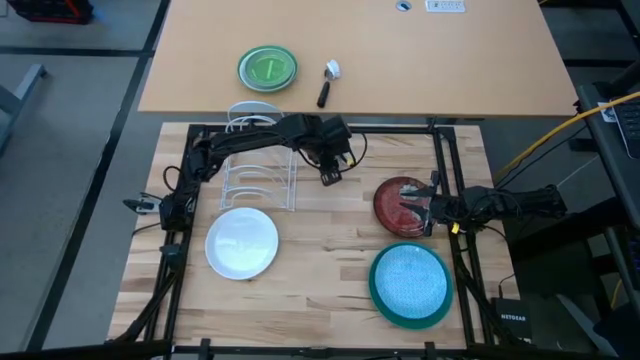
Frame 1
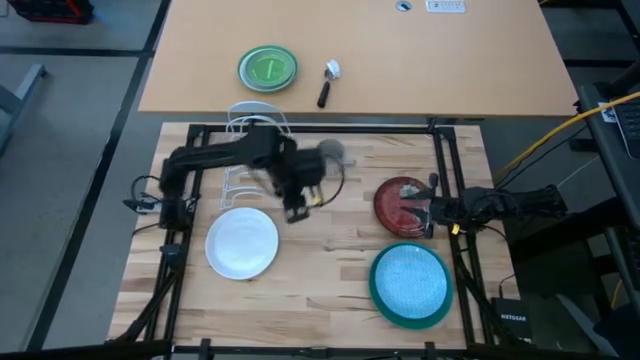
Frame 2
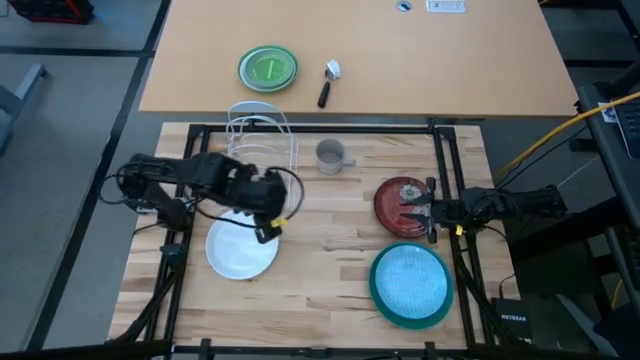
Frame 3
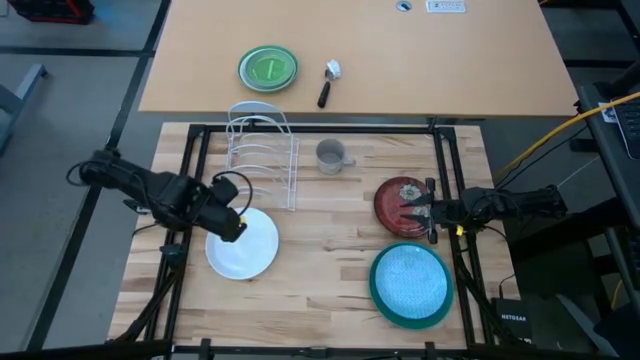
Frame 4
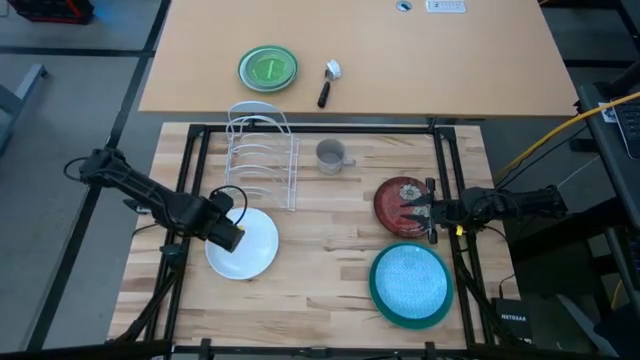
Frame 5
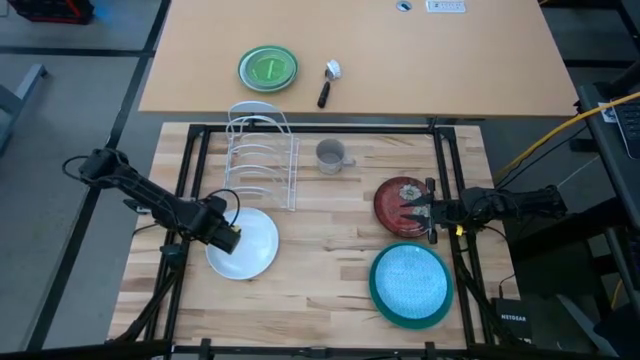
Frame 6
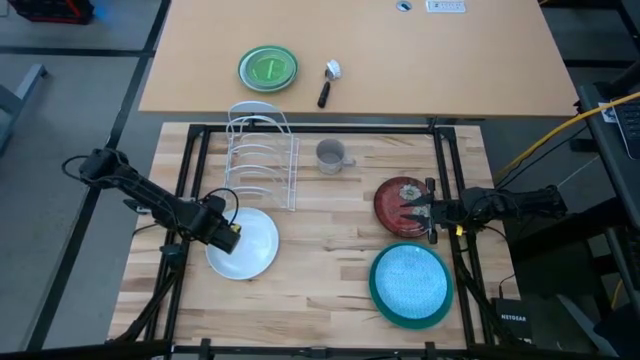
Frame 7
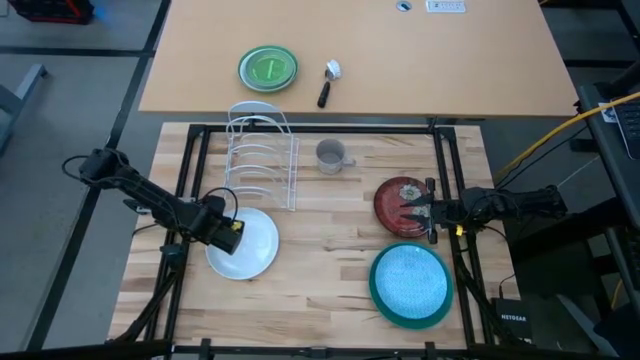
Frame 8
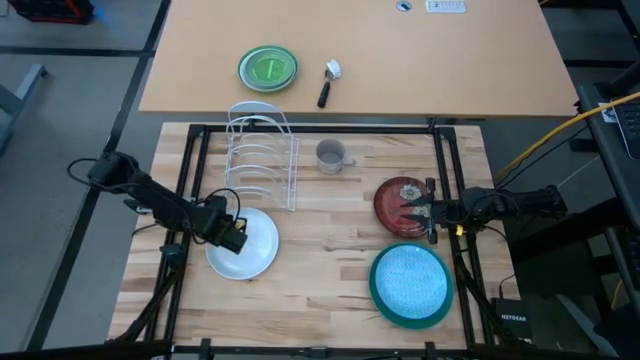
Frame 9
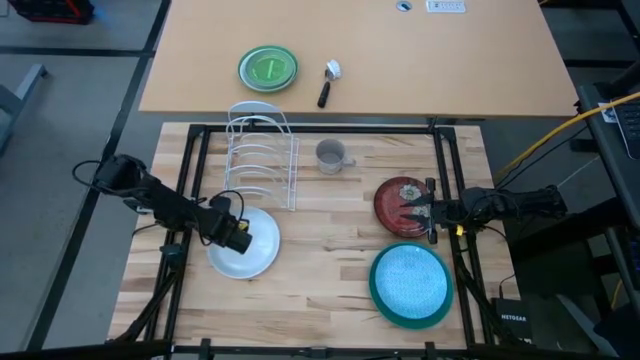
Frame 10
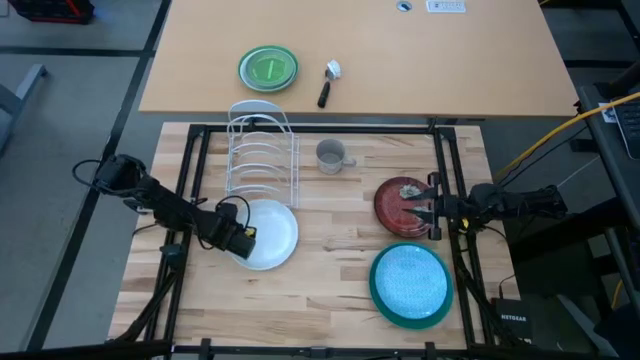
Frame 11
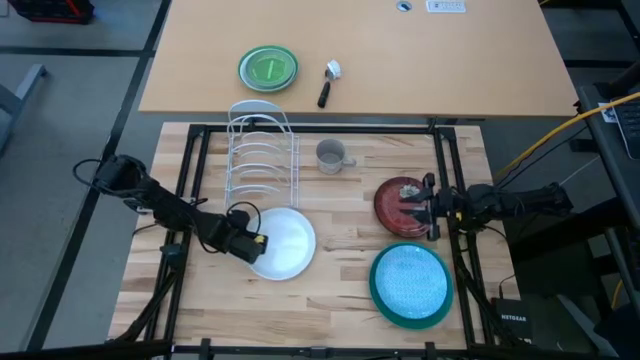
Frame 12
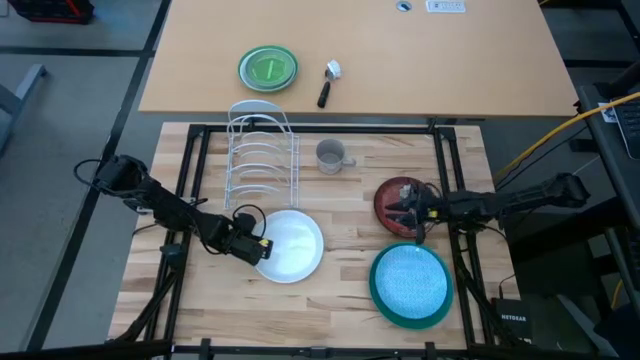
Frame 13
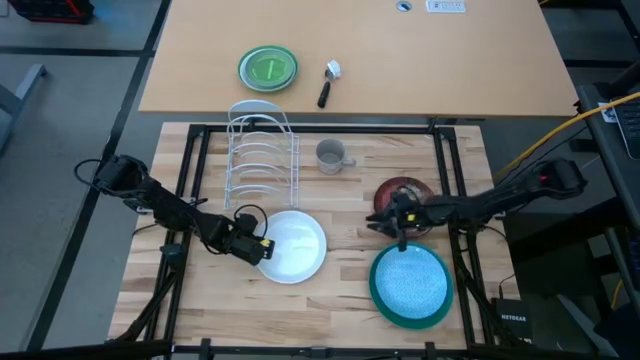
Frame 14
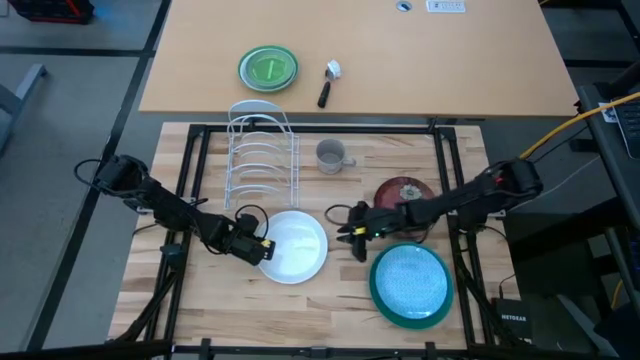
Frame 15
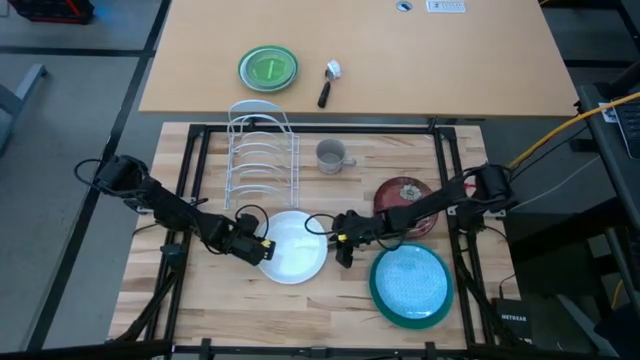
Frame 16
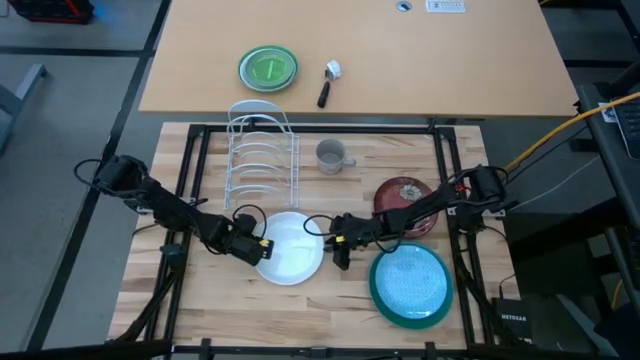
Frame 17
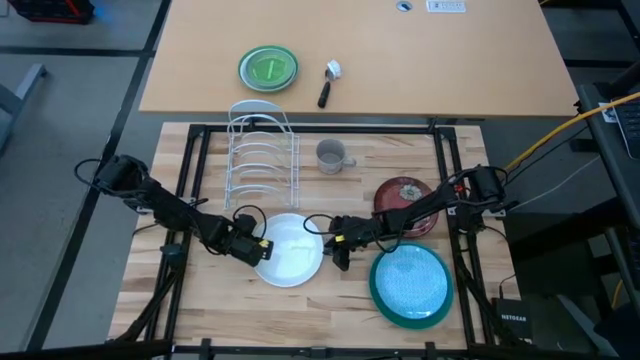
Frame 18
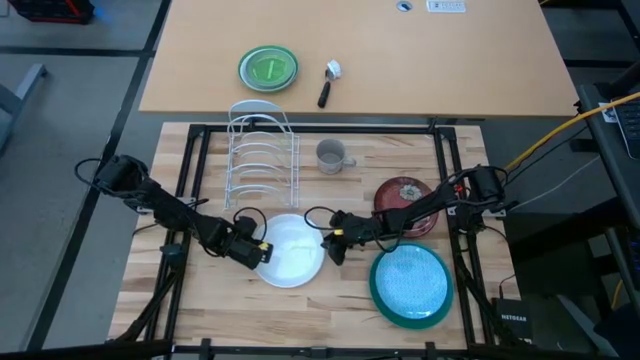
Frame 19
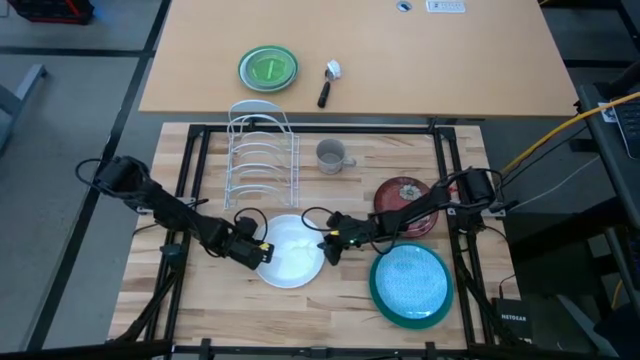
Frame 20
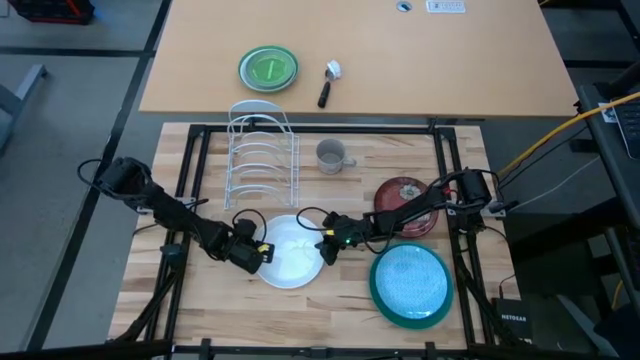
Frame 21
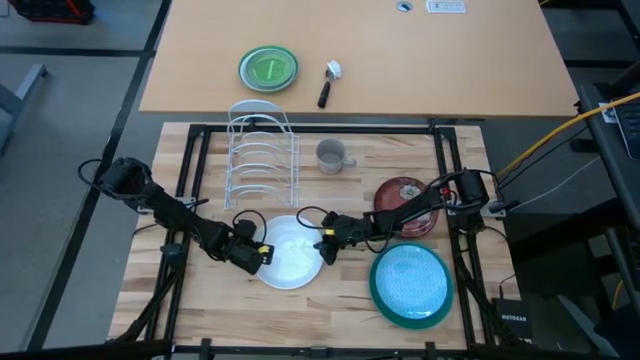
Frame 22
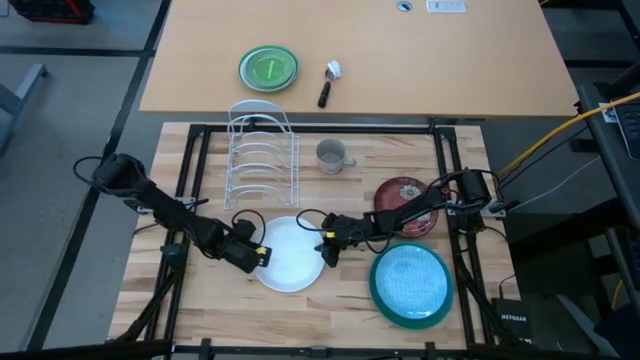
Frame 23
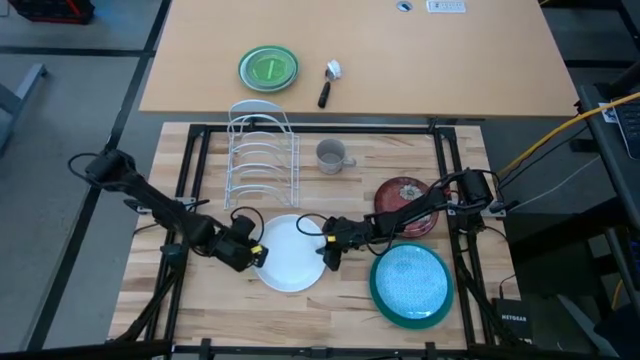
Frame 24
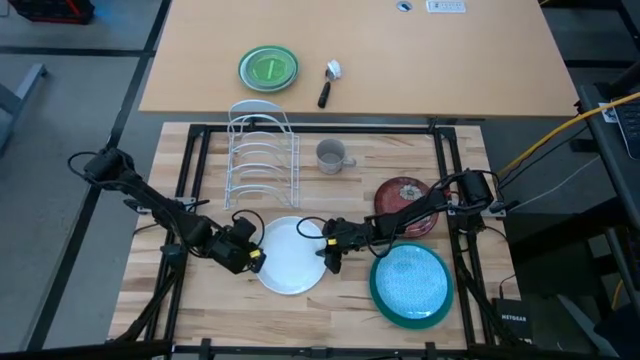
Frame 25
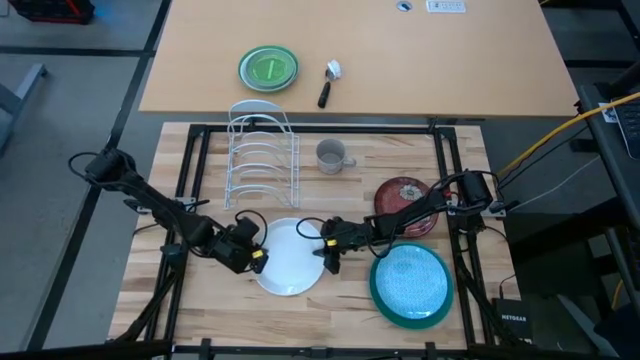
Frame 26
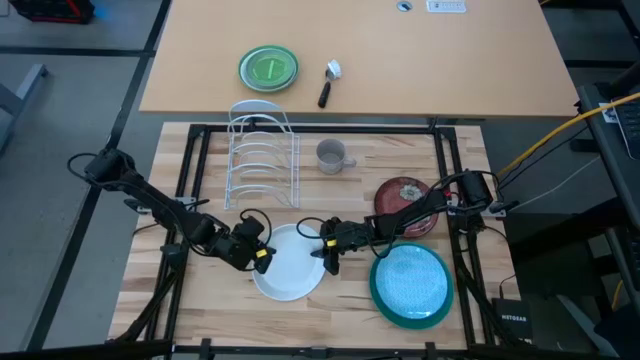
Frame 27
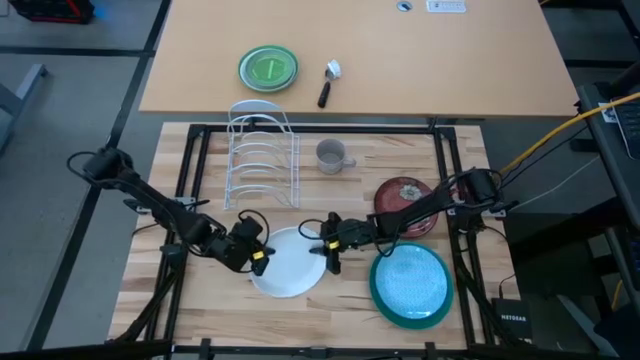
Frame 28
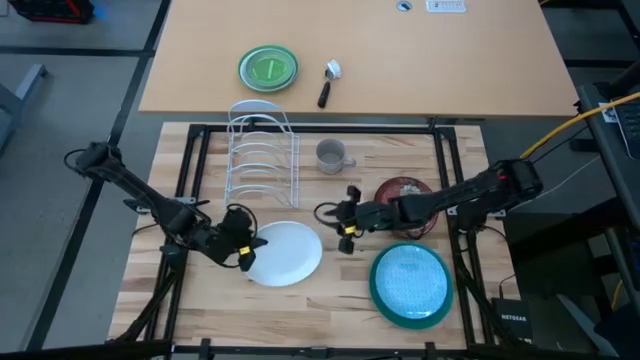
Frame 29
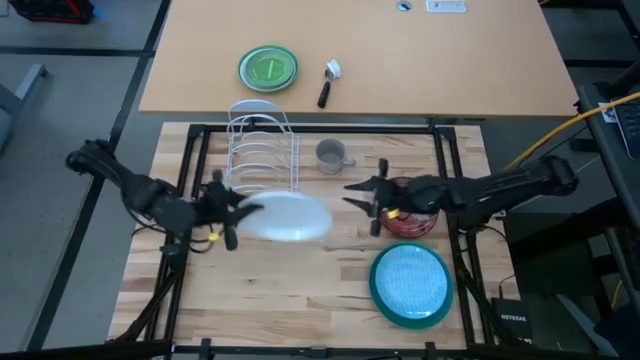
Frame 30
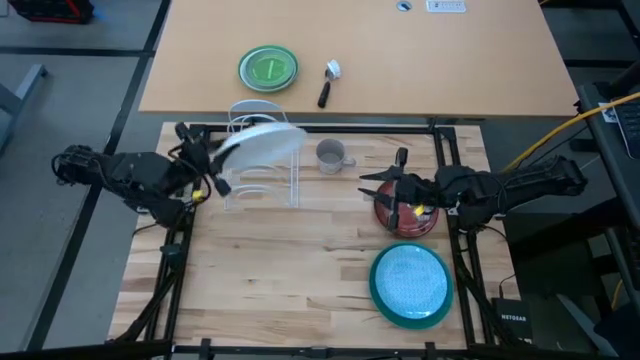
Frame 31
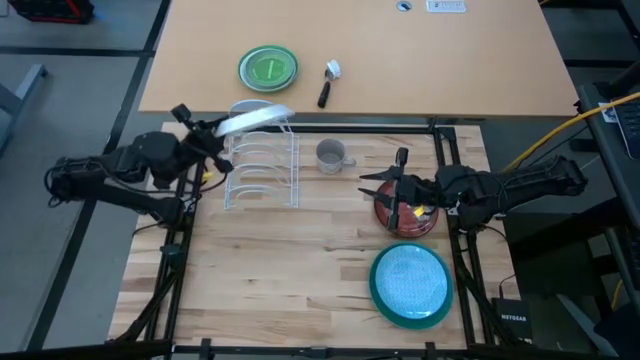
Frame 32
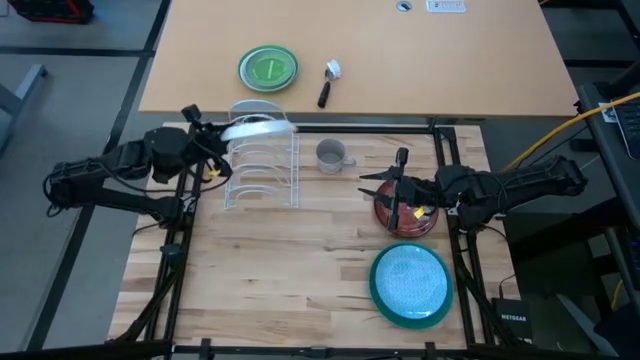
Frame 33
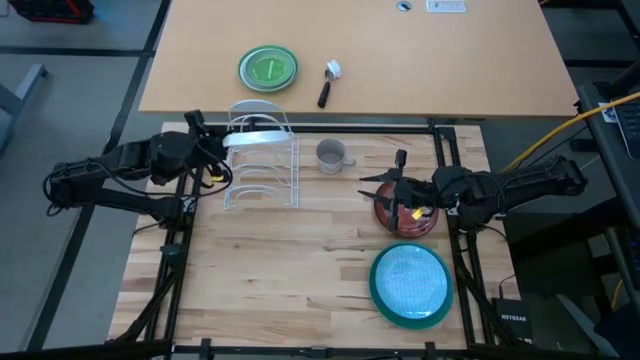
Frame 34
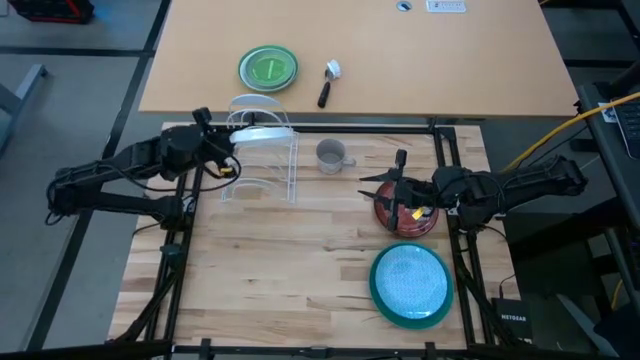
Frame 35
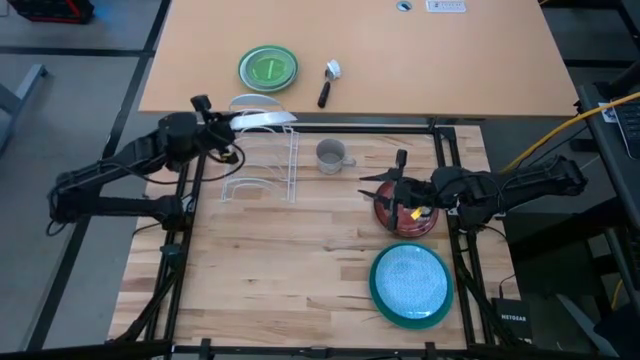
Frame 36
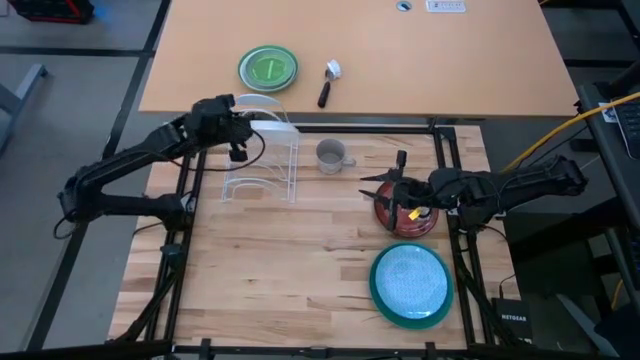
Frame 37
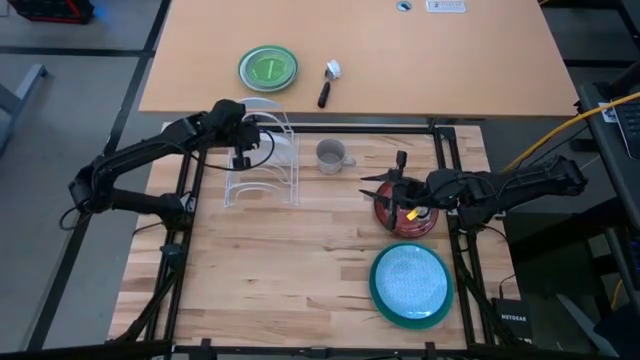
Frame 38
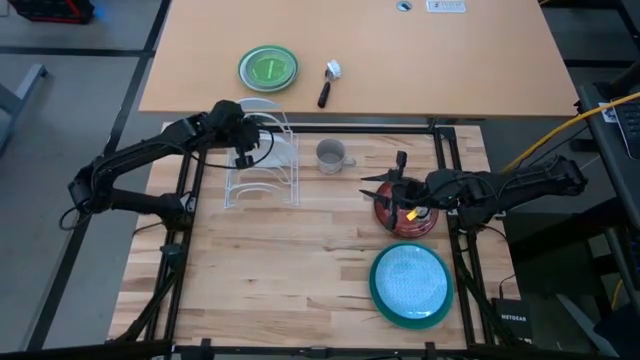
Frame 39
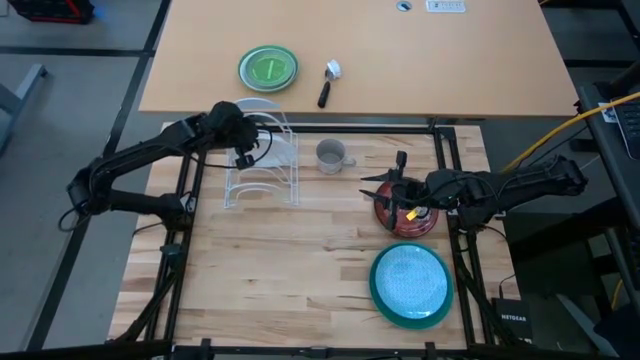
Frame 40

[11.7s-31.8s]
Task: Sort dishes
Put the white plate into the dish rack
